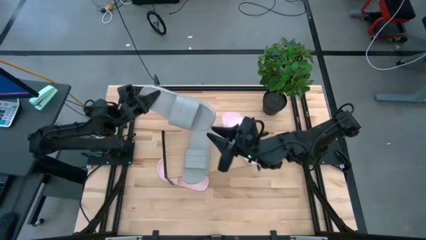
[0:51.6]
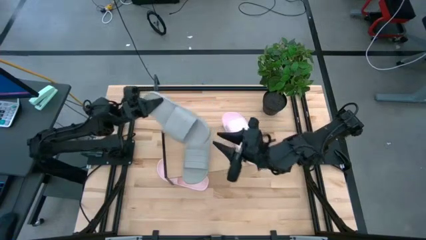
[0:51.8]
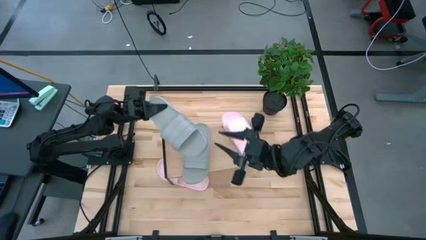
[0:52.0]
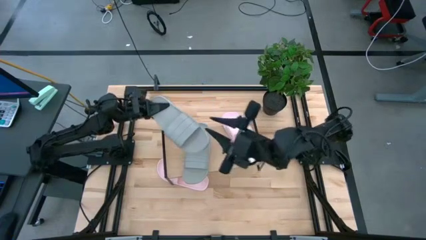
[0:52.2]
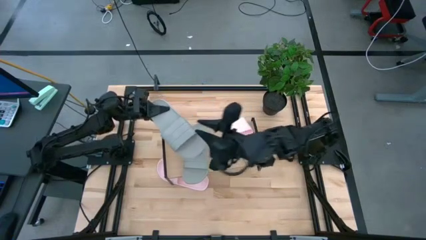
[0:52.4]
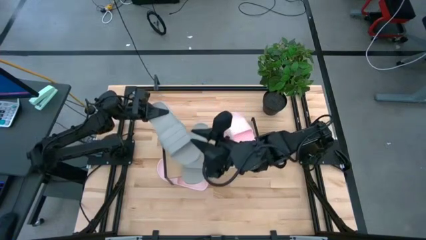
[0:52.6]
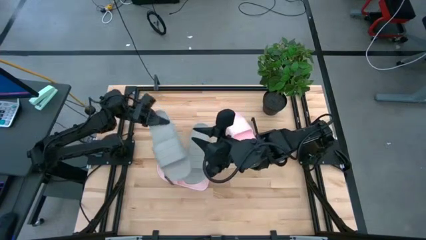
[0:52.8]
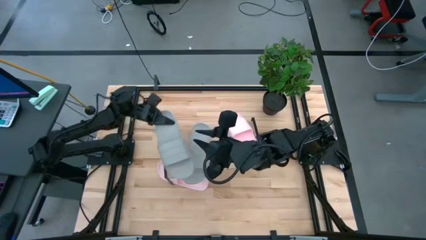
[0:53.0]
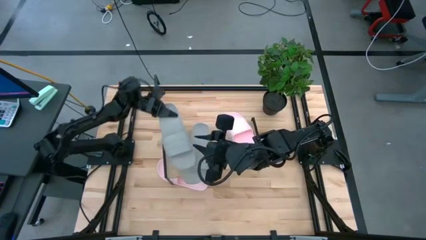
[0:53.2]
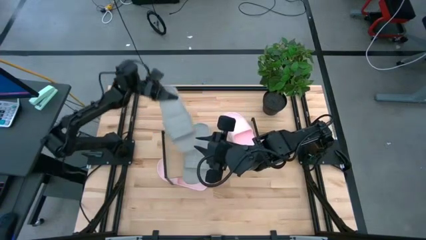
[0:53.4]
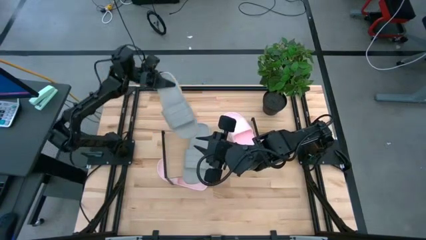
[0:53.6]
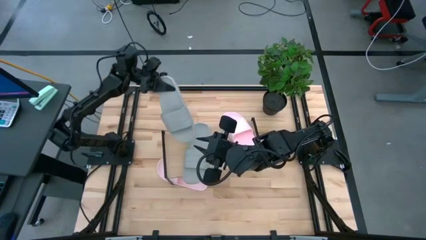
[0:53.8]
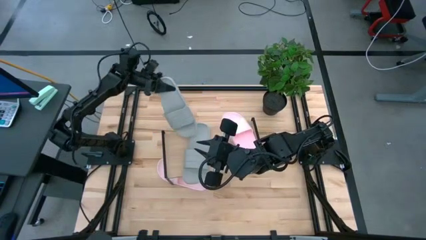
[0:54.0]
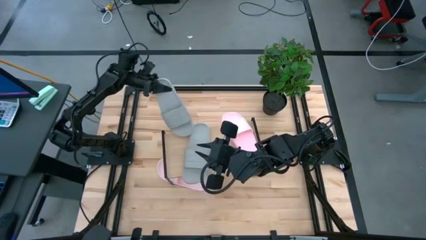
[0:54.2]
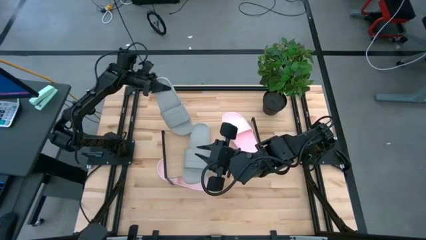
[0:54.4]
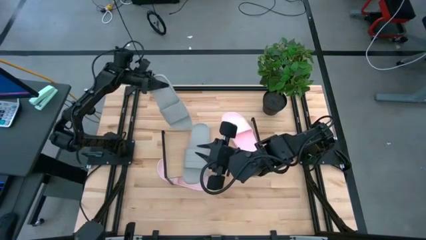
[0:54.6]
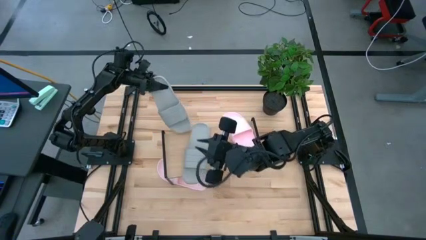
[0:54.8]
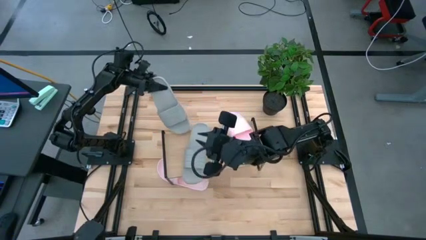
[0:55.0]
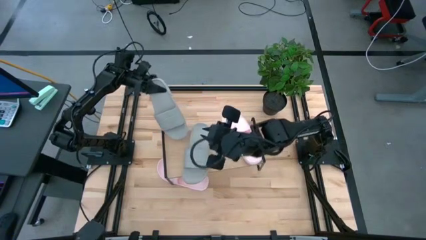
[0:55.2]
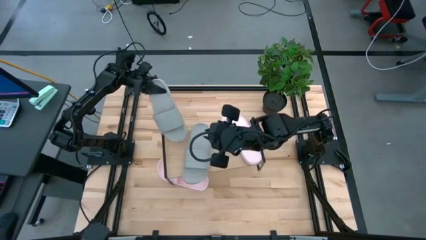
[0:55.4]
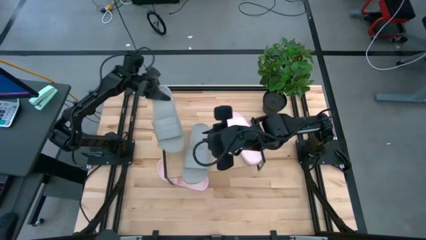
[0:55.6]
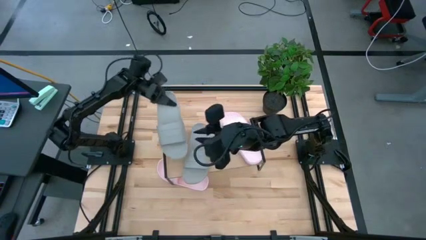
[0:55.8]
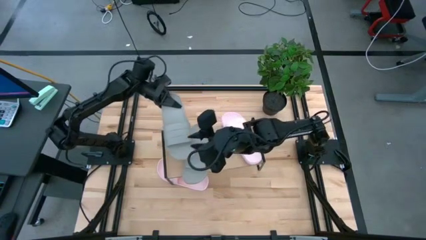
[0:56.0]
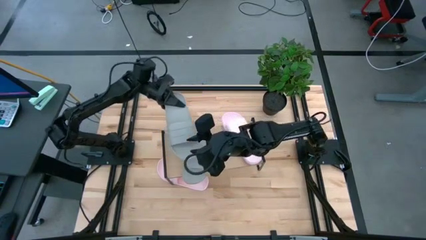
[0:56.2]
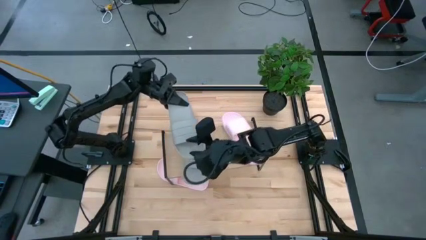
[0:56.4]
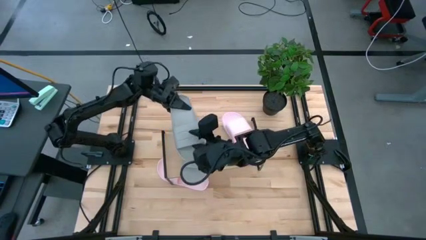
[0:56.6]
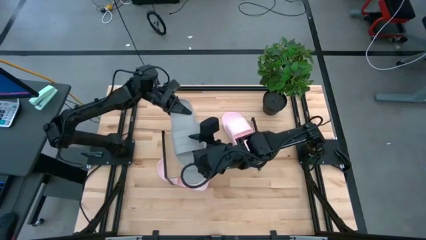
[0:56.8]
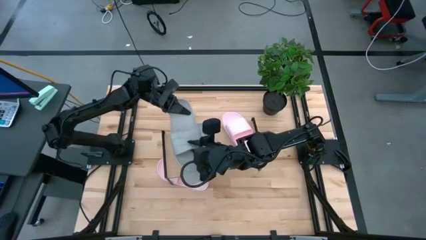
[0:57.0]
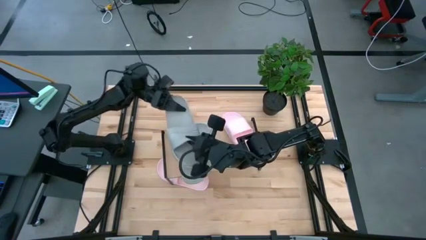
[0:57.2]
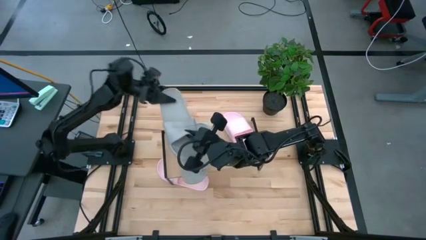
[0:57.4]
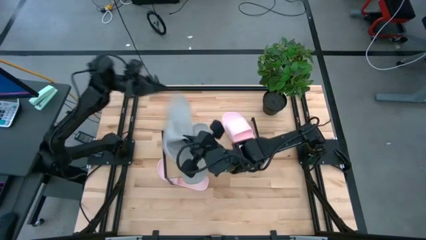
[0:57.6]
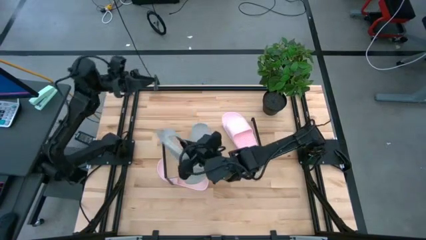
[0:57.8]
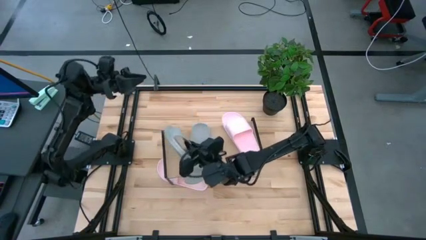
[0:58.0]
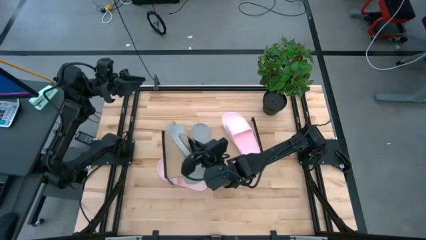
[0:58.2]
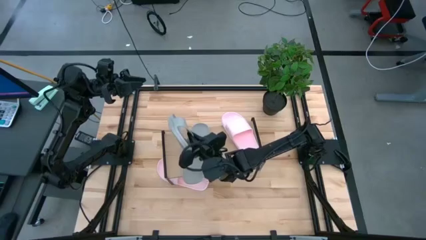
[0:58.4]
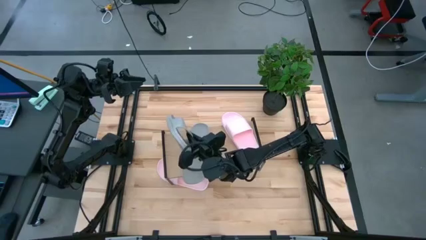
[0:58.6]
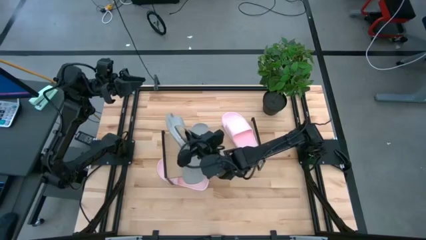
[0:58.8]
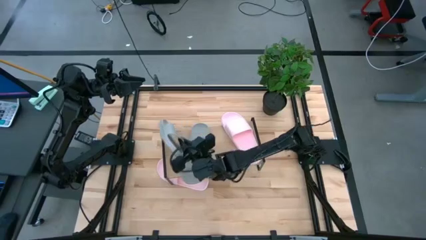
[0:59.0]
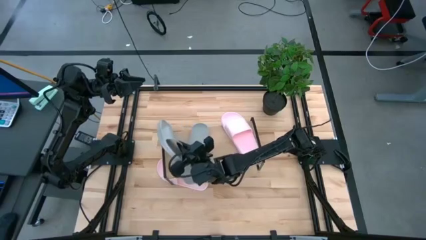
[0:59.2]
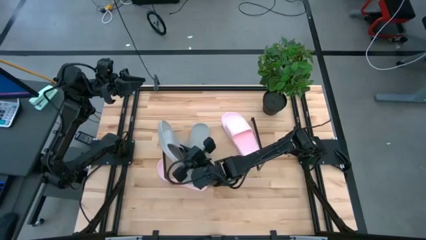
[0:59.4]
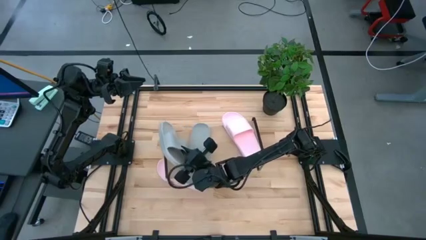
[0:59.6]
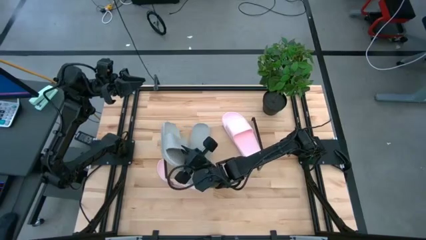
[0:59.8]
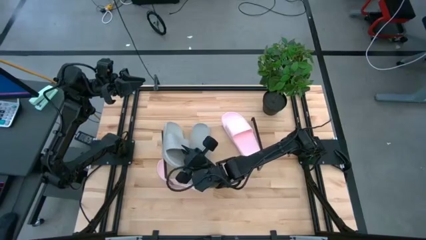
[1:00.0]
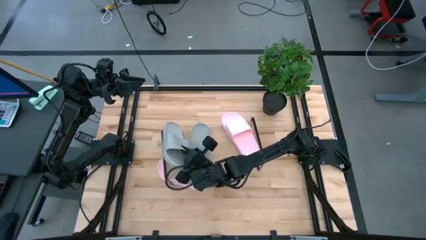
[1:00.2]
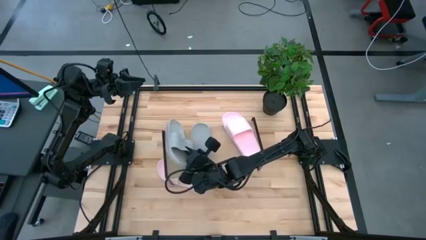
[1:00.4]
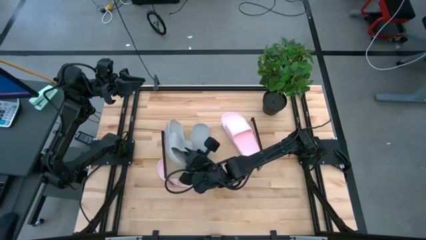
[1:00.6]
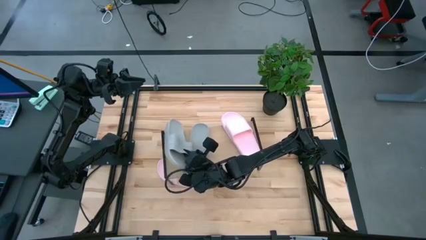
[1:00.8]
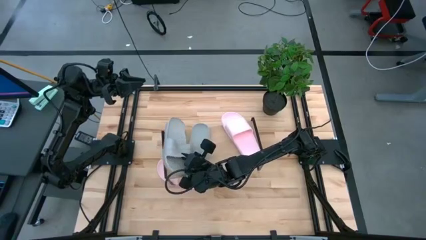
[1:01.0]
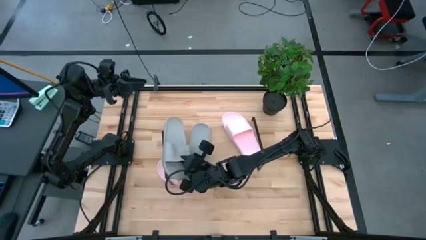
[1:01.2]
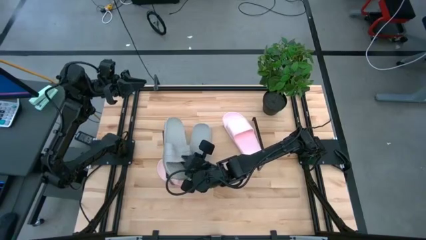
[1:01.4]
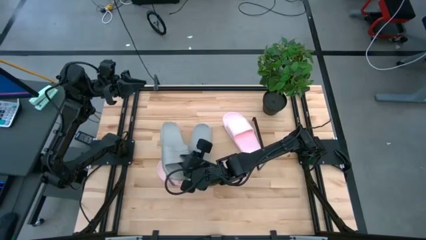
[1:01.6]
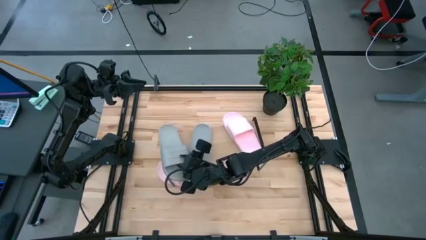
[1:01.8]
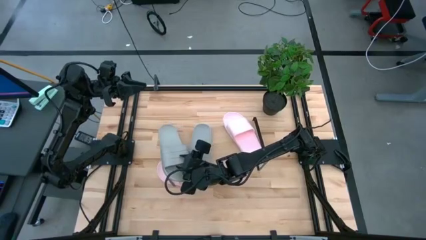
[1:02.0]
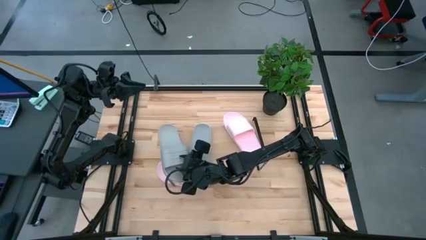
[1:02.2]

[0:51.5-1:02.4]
Task: Pick and place slides into the shelf
Put the gray slide on the shelf

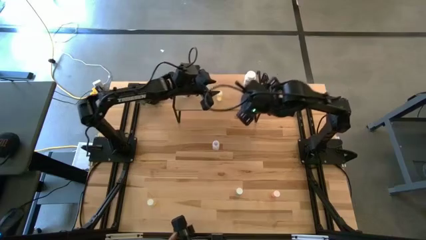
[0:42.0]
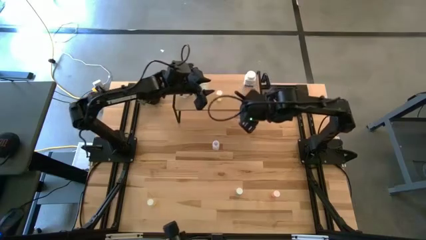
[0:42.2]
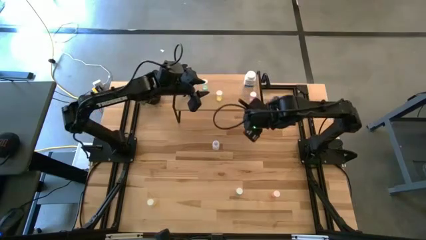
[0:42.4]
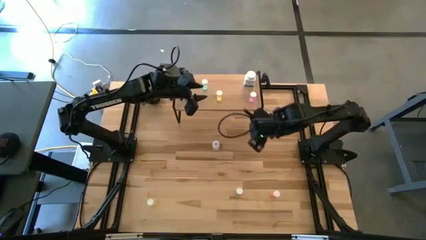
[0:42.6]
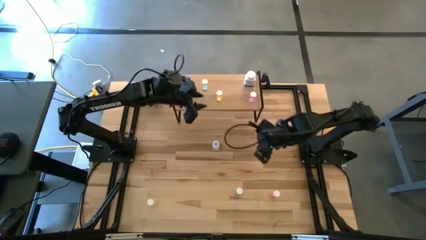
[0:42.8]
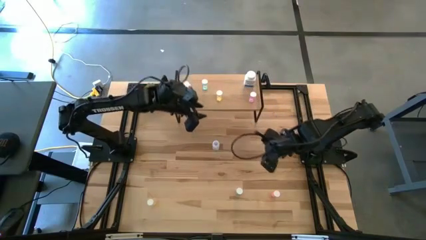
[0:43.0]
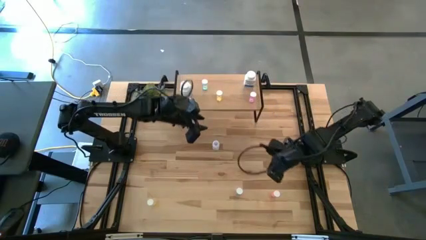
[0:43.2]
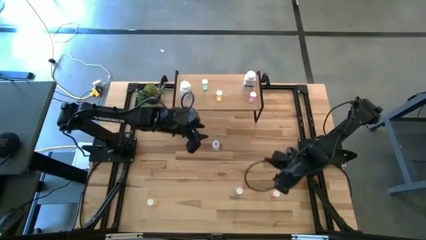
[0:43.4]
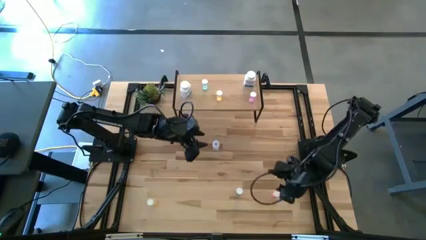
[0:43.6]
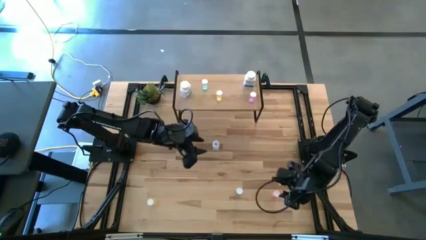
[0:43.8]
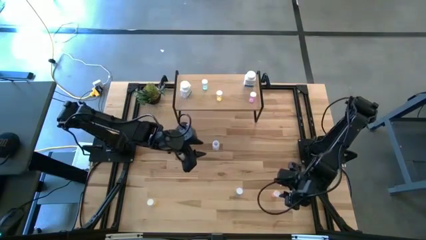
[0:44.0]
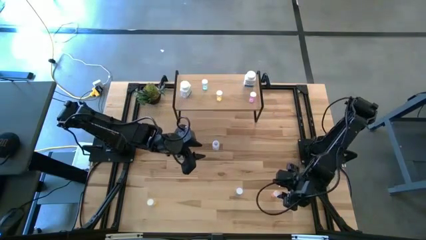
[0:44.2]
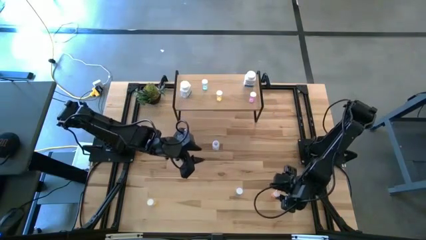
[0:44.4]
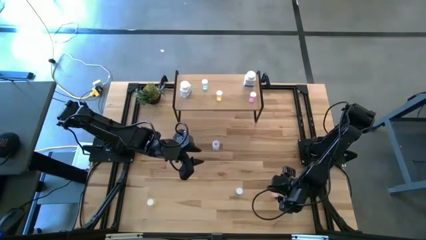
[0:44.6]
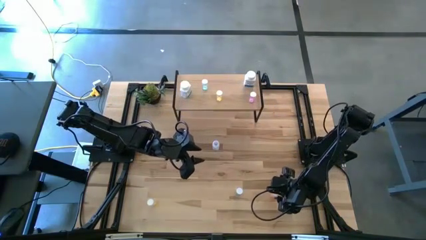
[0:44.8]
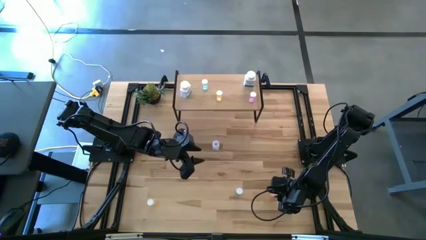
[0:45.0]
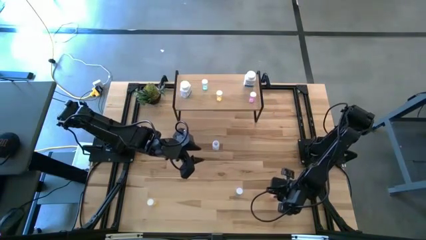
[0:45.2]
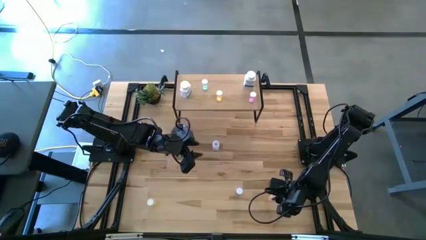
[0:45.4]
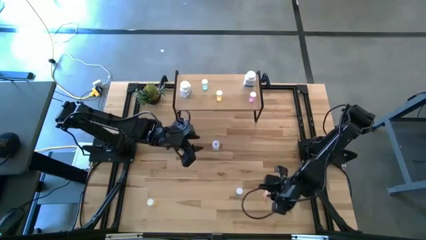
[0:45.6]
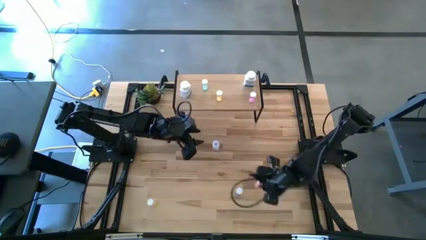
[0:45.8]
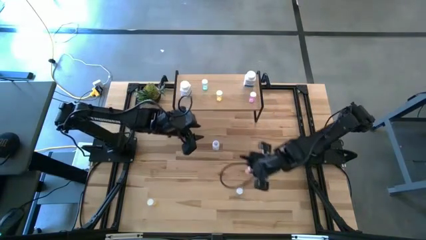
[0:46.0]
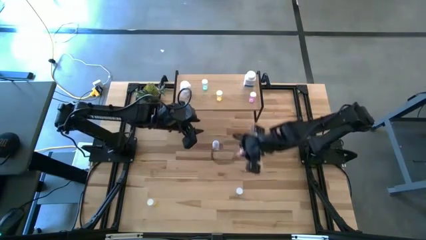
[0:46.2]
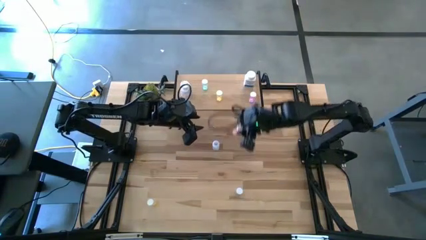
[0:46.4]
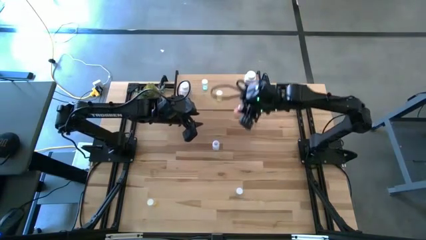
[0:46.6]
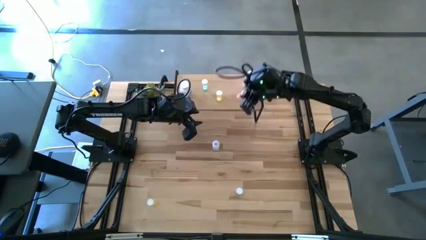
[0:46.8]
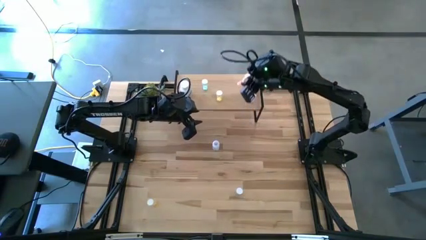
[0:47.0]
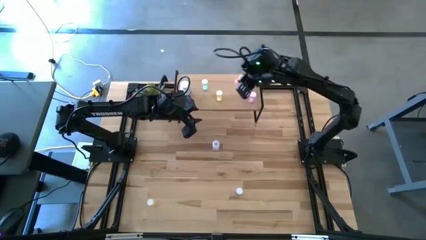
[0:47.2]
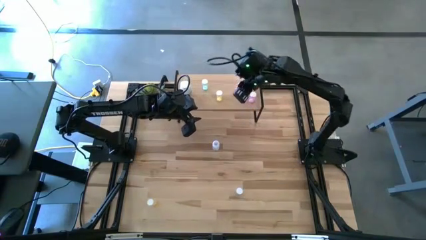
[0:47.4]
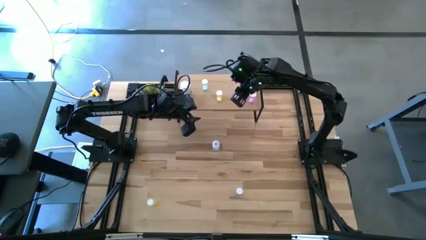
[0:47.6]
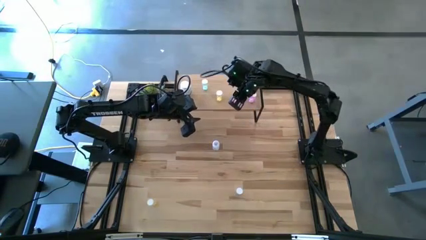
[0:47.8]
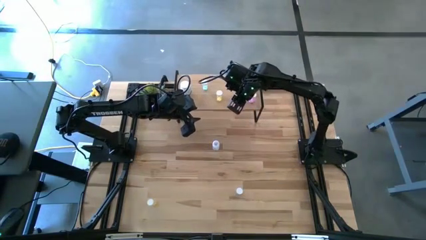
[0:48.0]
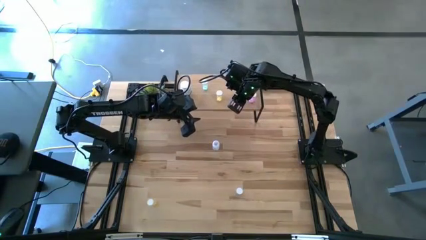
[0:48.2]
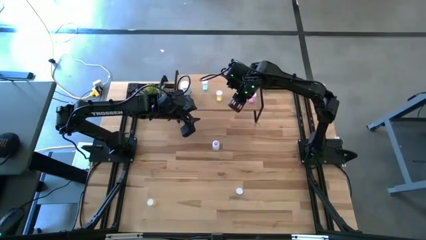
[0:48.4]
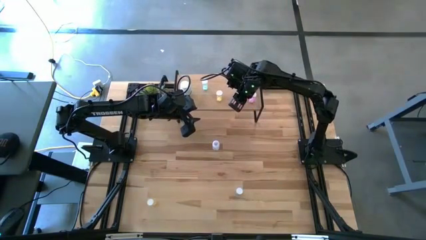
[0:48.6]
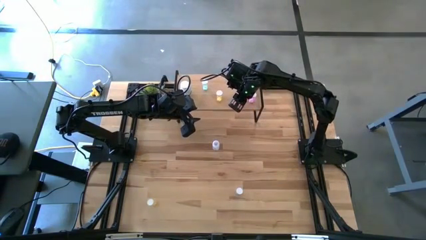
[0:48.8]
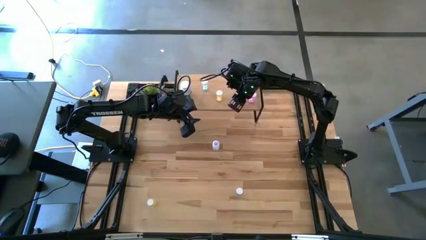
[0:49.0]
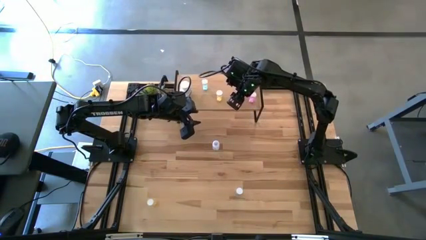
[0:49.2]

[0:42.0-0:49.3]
Task: Pick and place medicine bottles onto shelf by color
Put the pink pill bottle on the shelf
